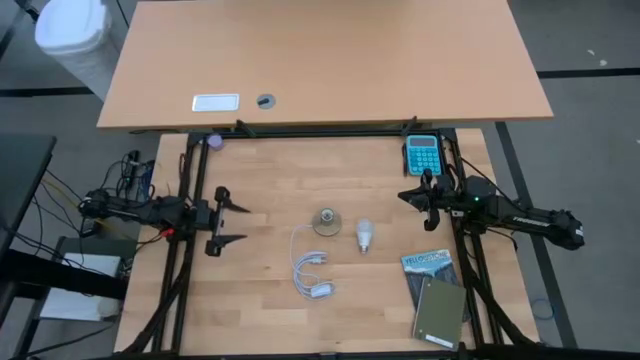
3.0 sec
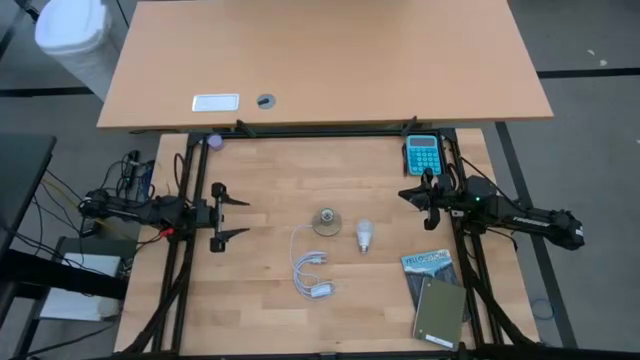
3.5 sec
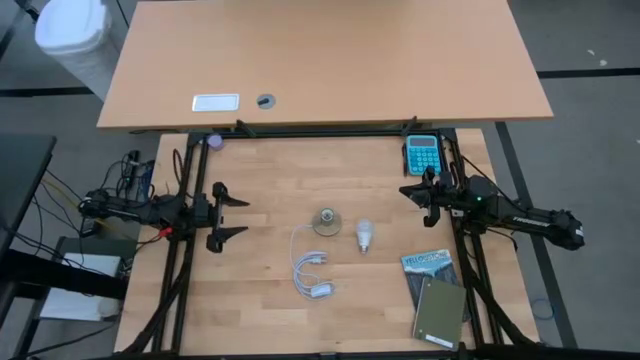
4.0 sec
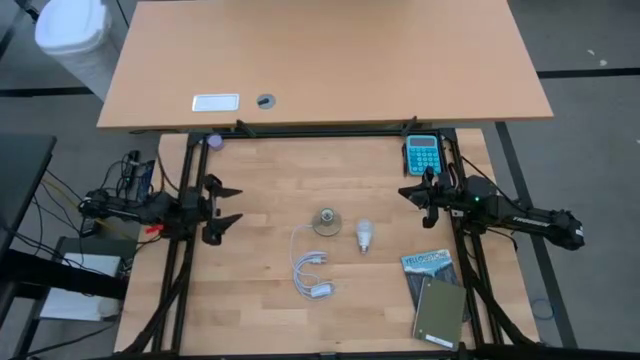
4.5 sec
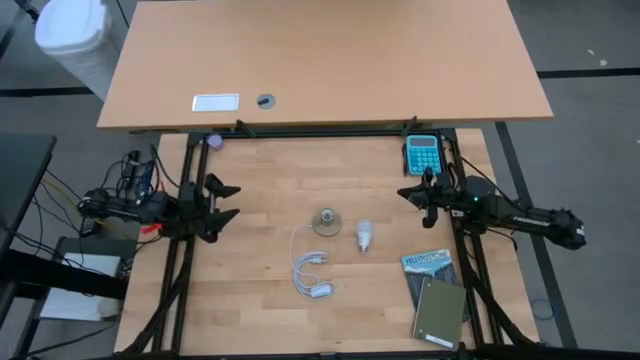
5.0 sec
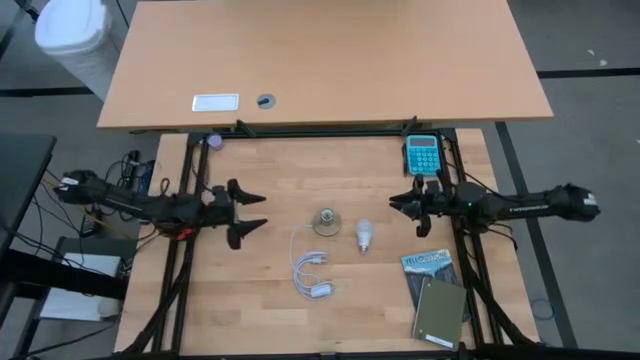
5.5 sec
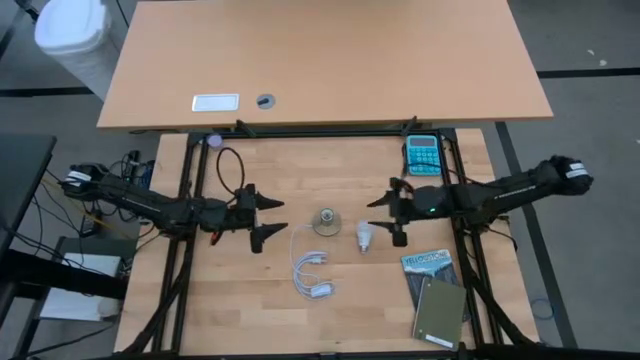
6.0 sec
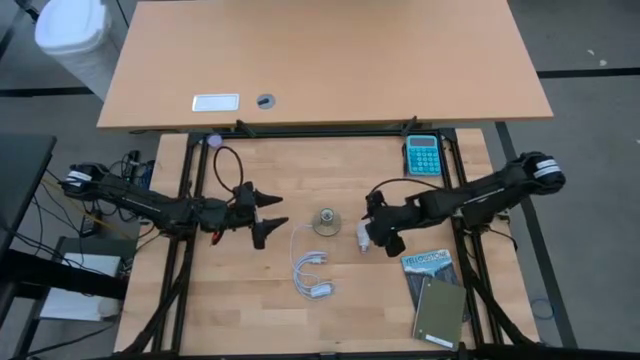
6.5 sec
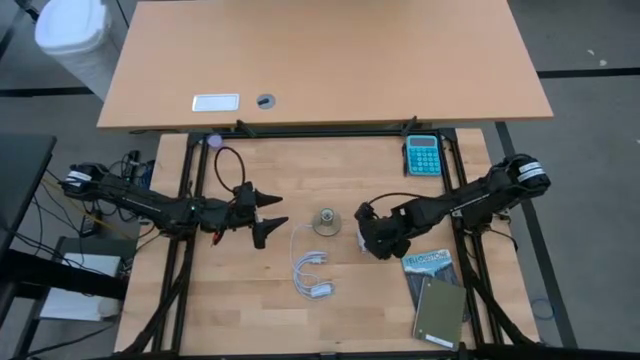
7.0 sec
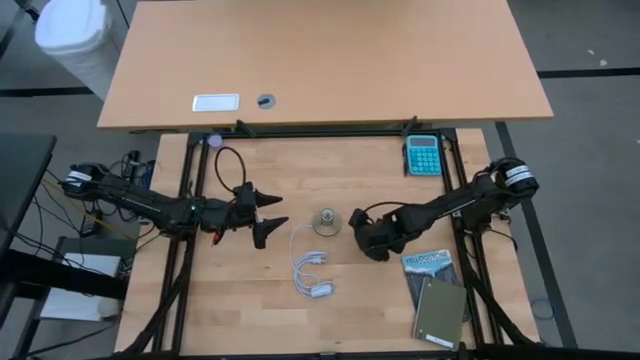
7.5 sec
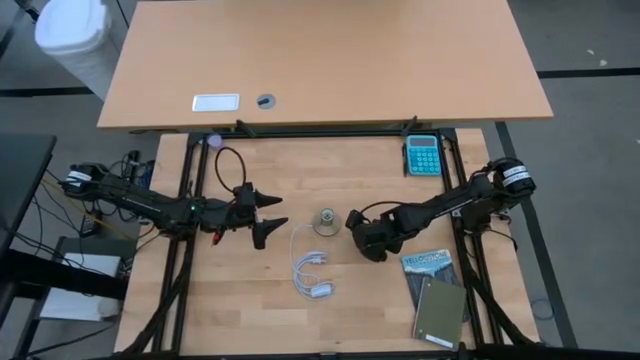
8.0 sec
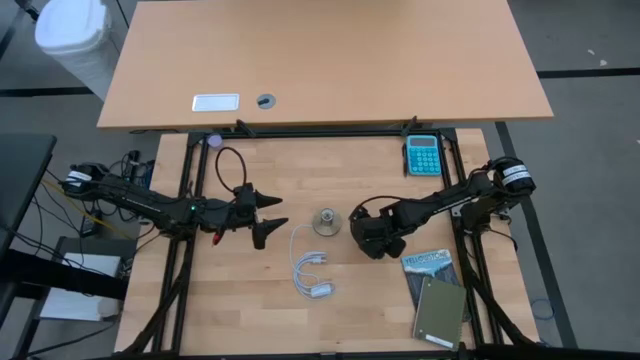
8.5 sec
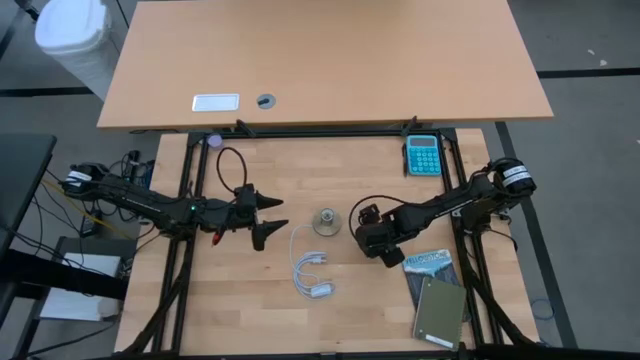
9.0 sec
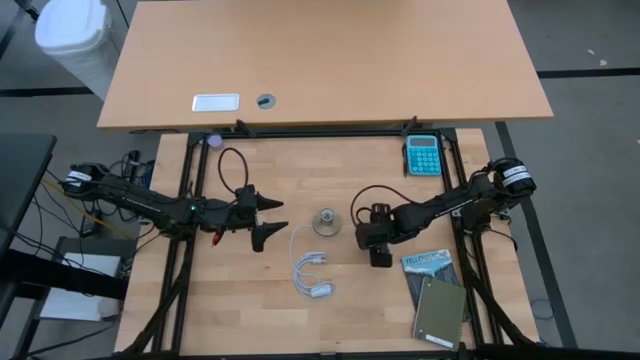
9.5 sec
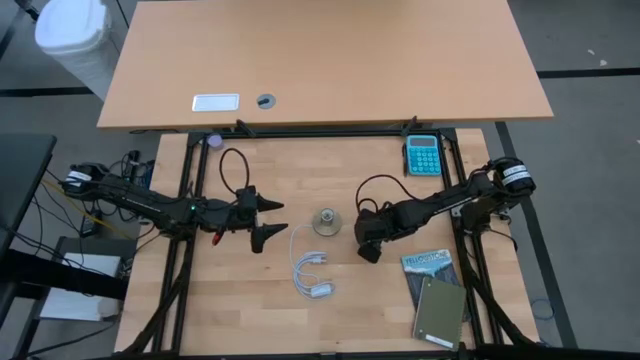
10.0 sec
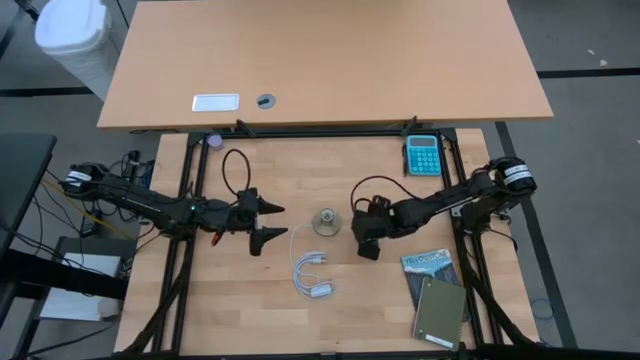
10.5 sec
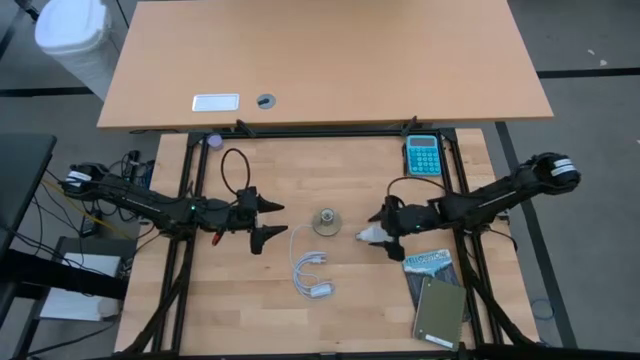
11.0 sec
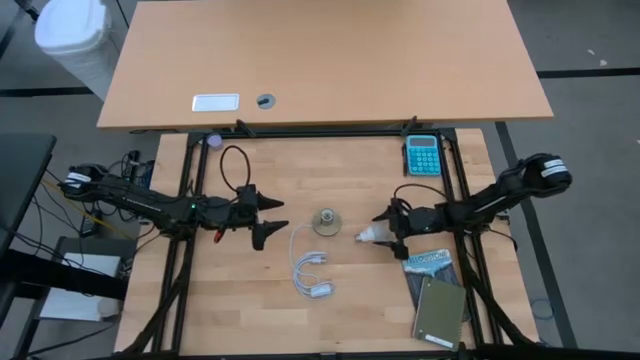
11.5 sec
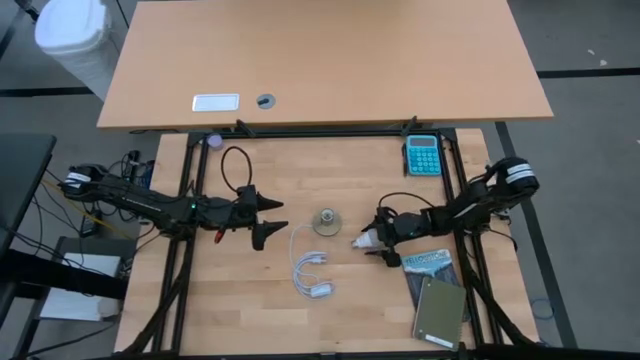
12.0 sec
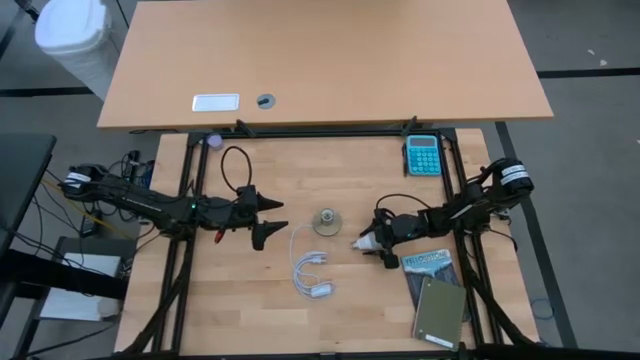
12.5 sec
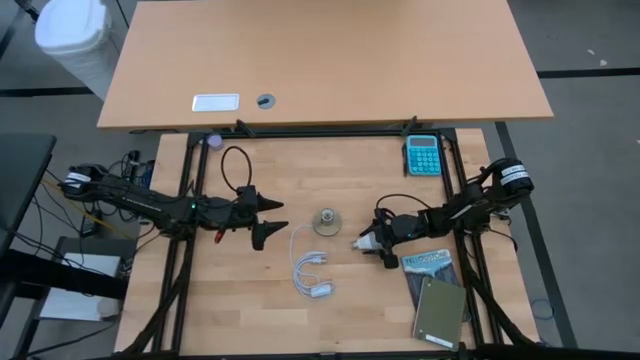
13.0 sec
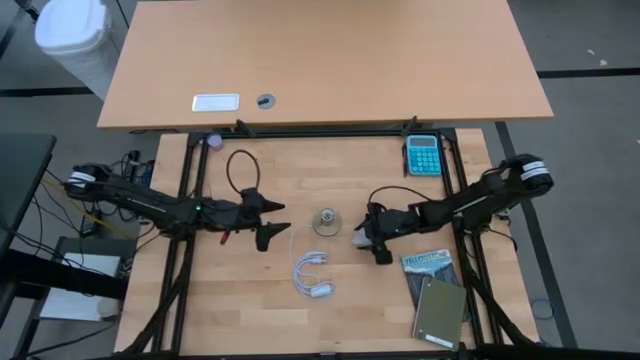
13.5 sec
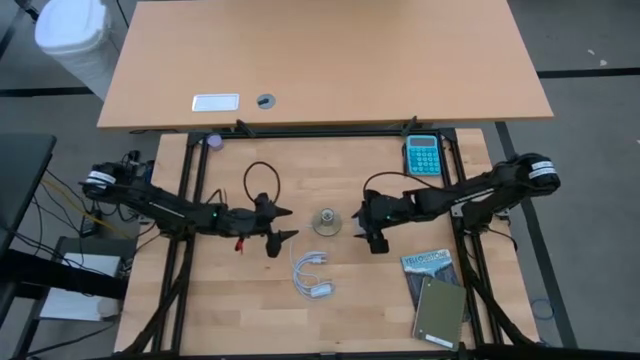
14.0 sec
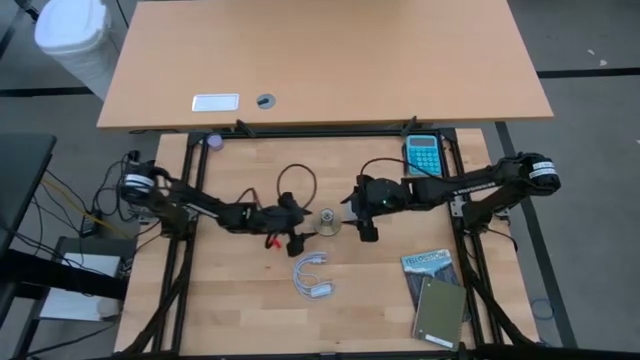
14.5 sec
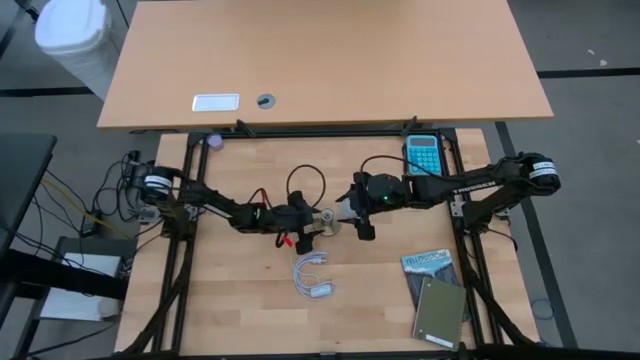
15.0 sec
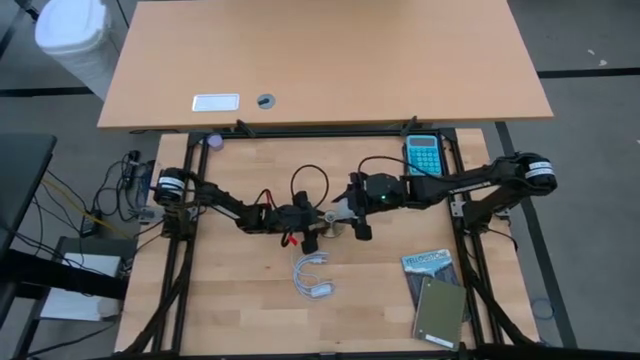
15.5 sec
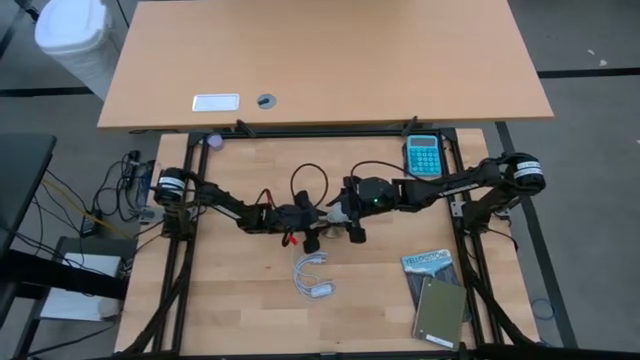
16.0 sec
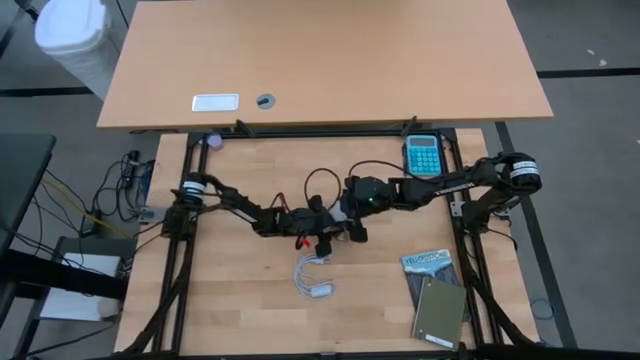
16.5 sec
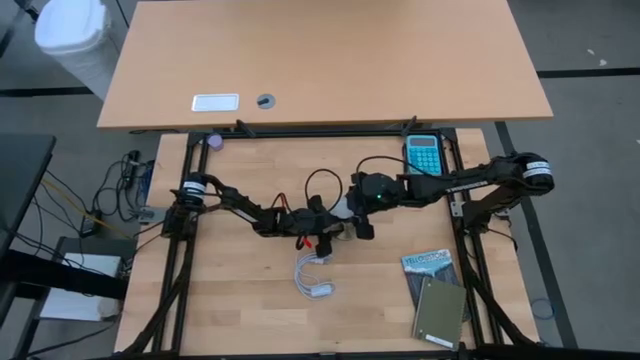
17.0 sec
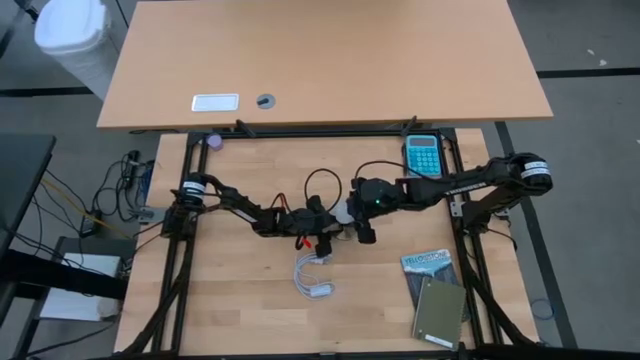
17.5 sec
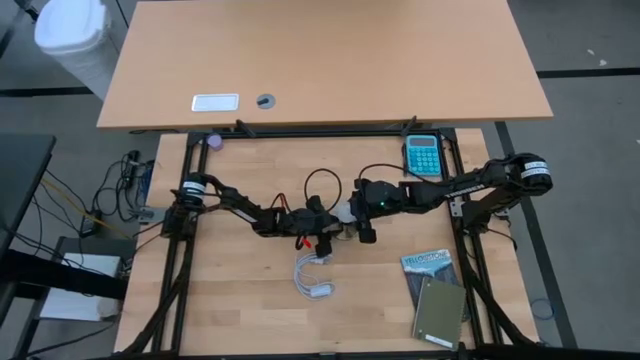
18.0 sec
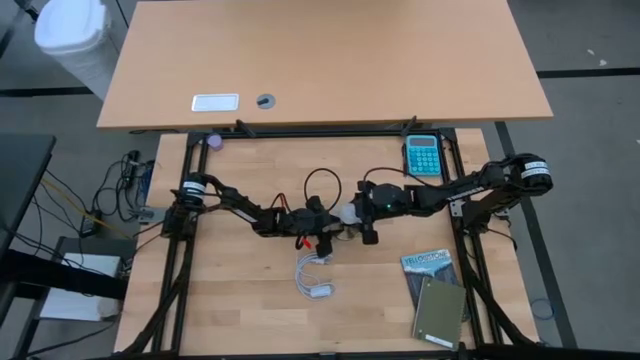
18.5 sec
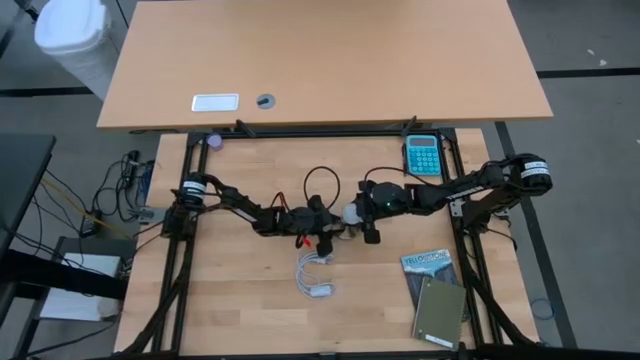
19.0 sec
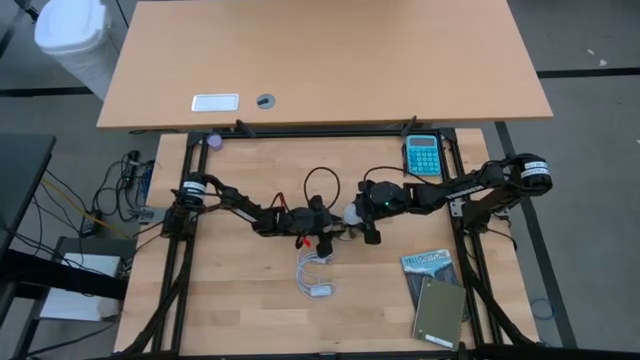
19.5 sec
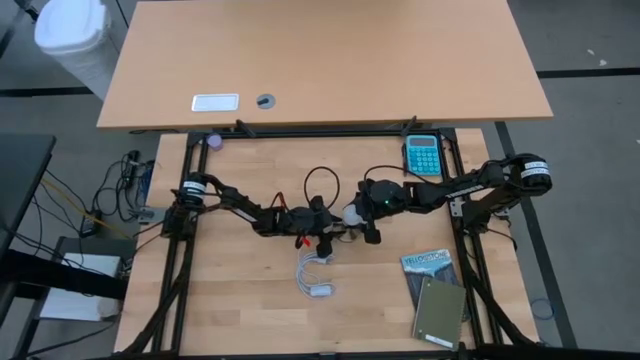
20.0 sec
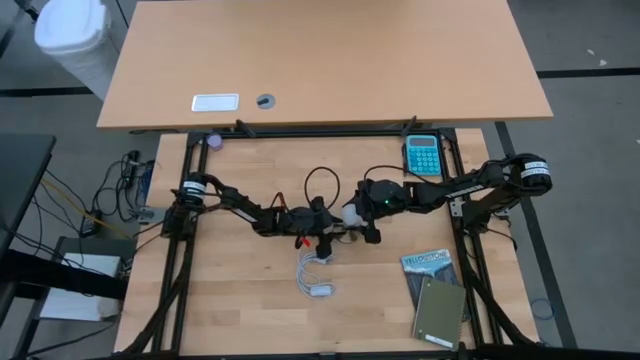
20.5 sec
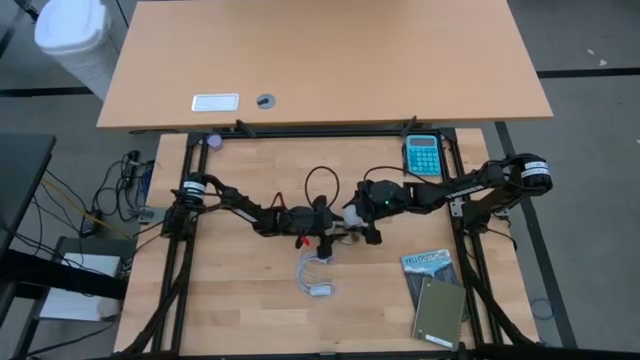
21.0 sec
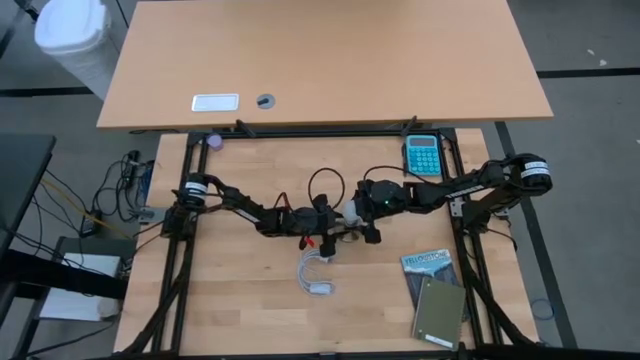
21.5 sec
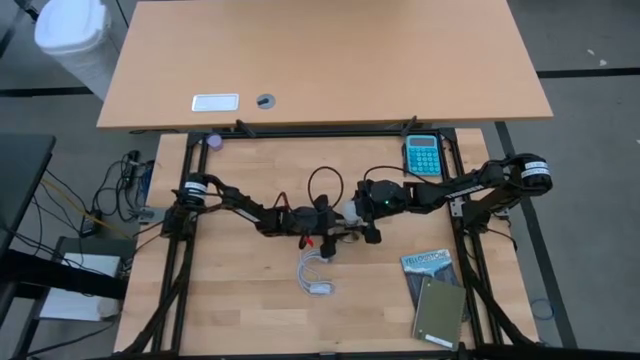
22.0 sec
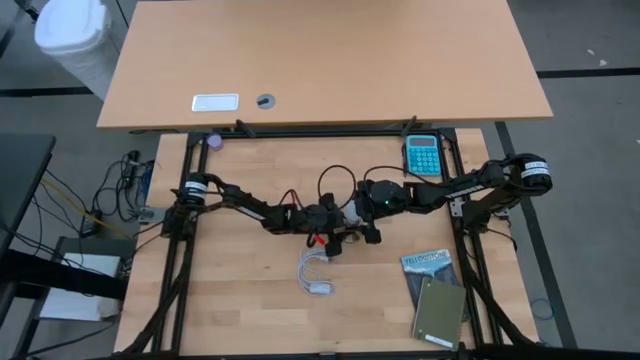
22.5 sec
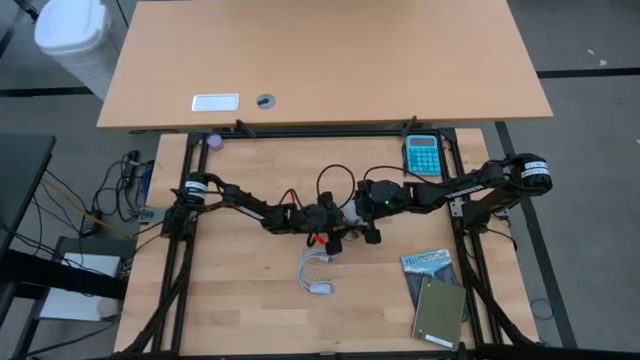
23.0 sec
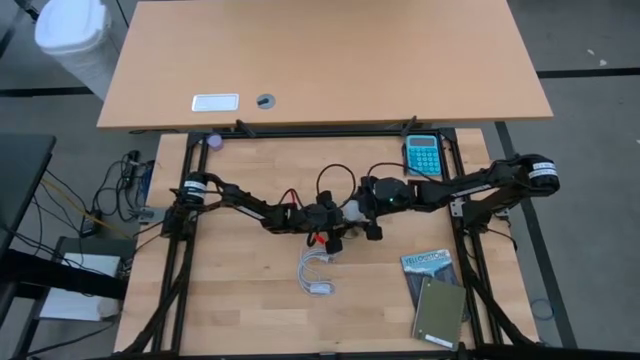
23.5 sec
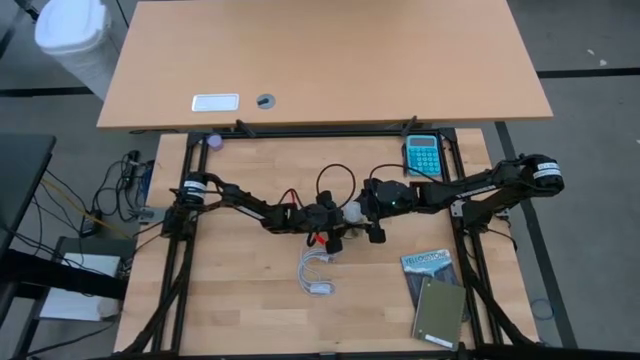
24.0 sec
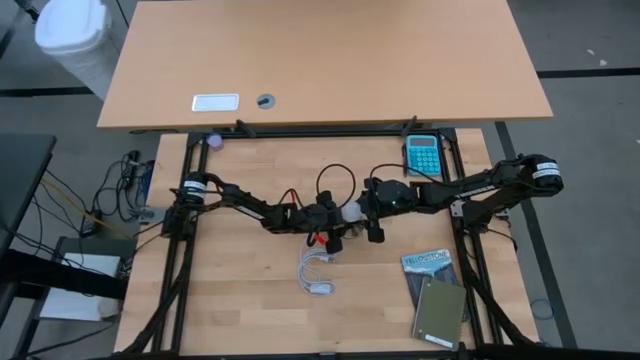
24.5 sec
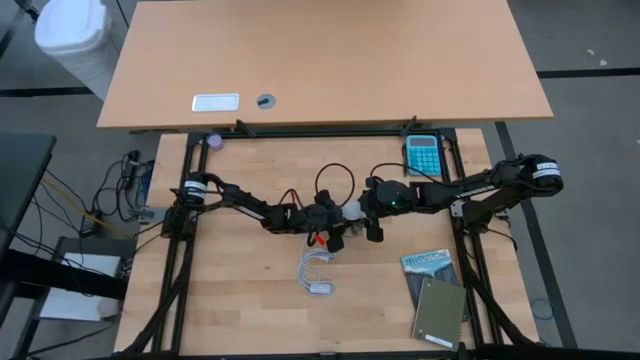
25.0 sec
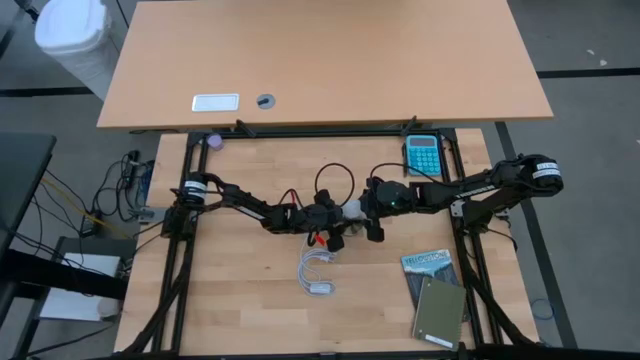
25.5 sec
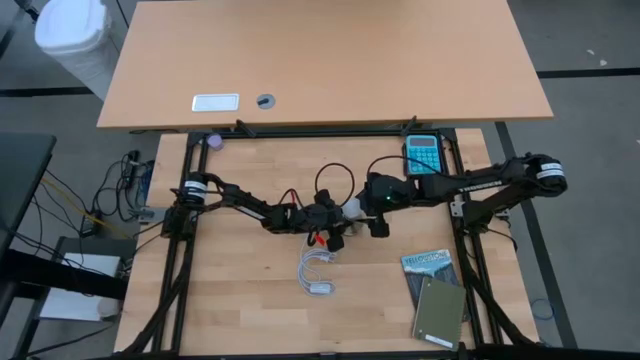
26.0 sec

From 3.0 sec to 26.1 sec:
Task: Screw lightbulb
Insert the lightbulb into the desk lamp
